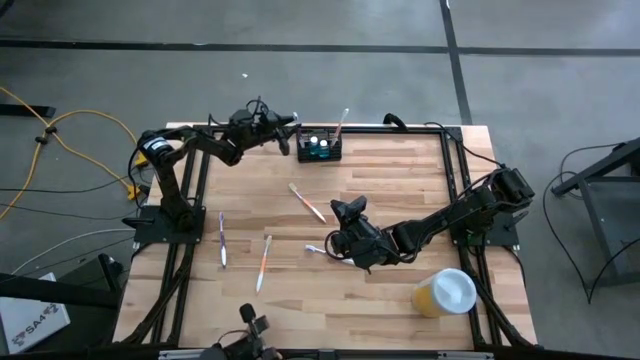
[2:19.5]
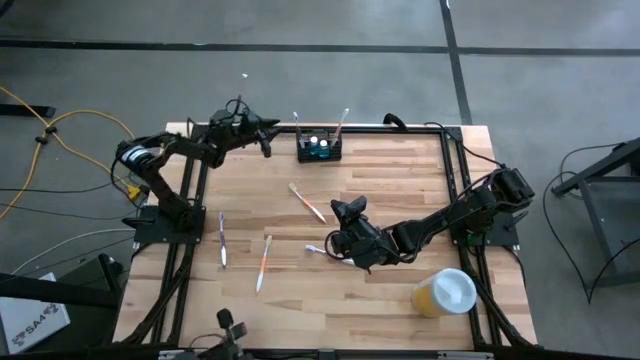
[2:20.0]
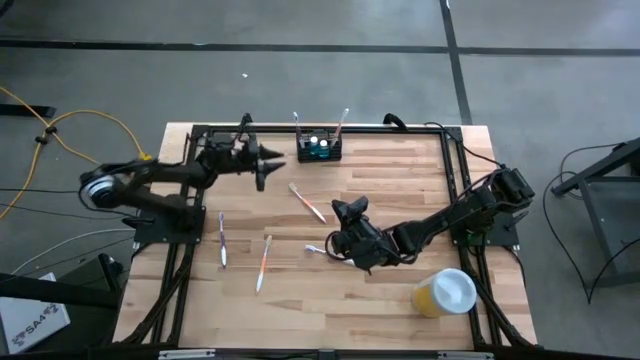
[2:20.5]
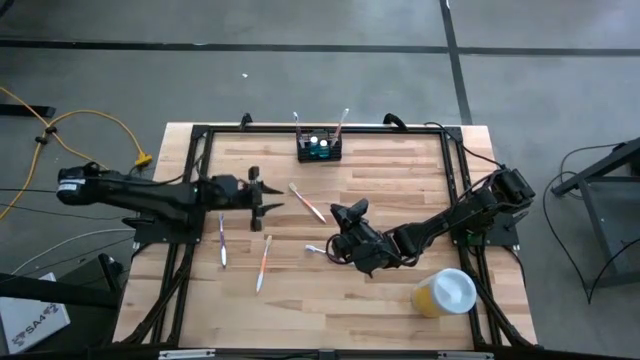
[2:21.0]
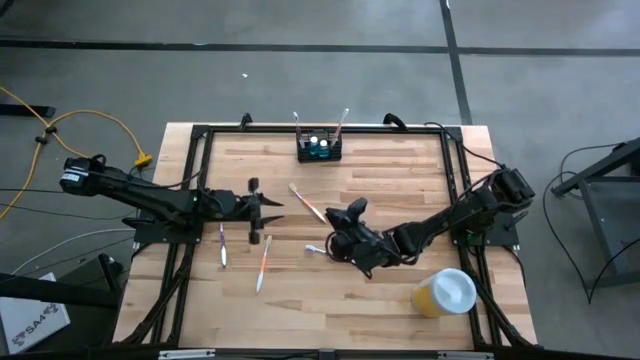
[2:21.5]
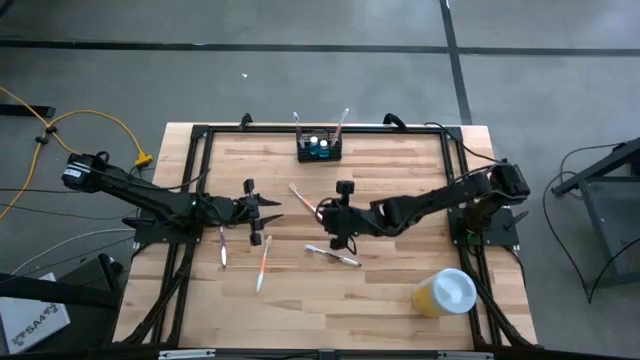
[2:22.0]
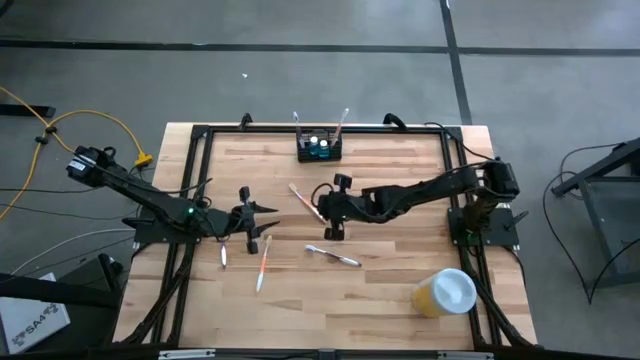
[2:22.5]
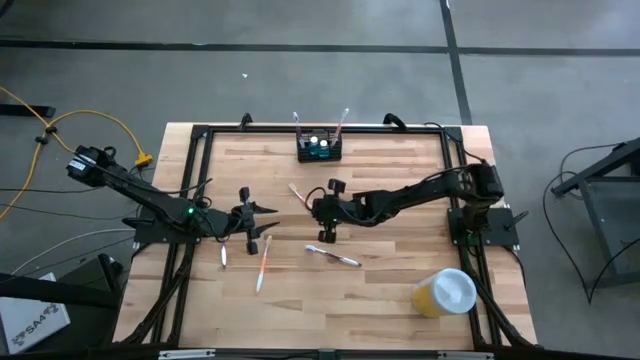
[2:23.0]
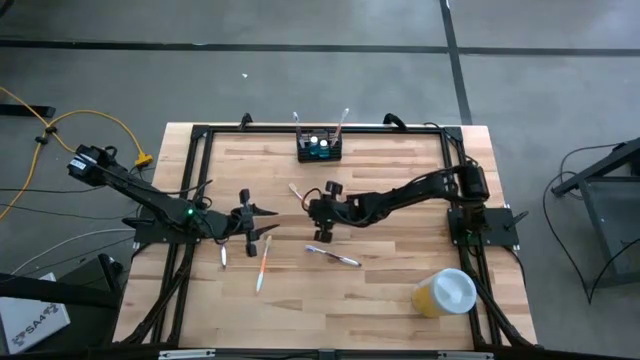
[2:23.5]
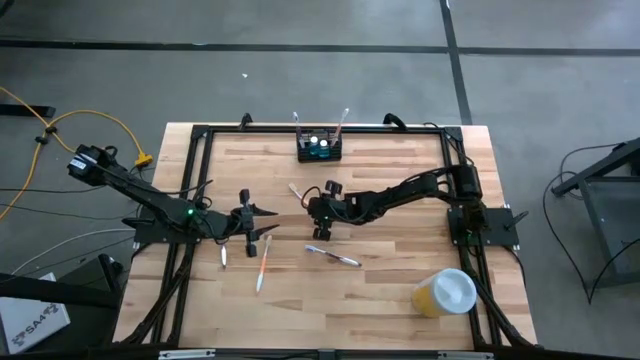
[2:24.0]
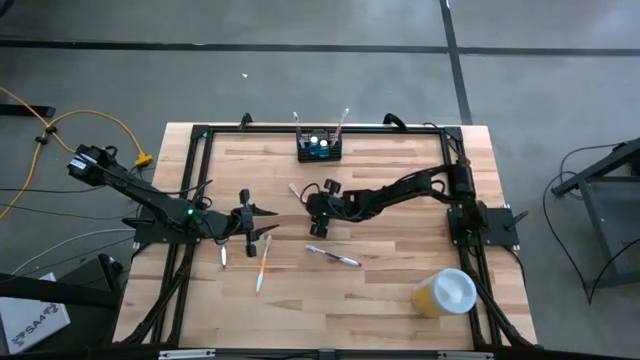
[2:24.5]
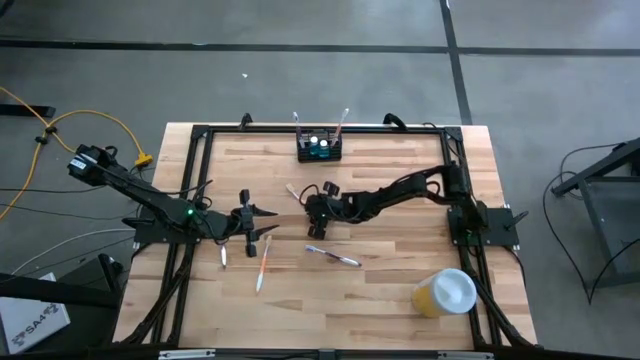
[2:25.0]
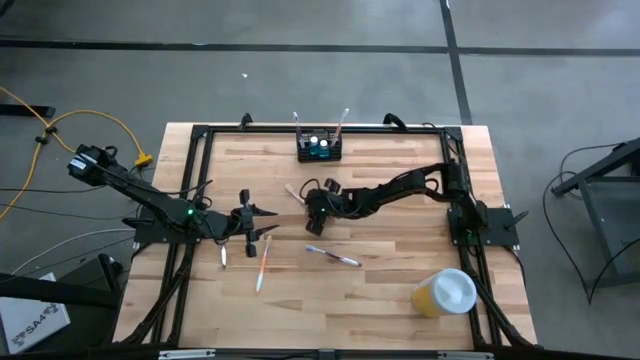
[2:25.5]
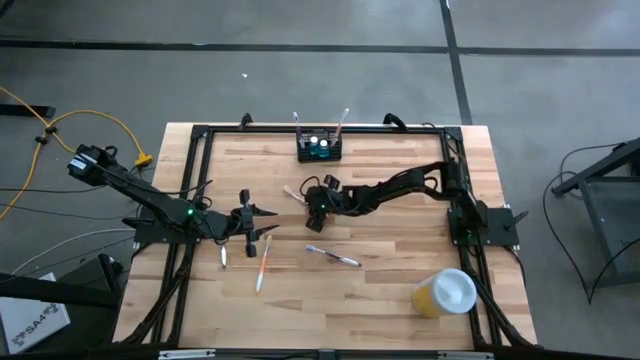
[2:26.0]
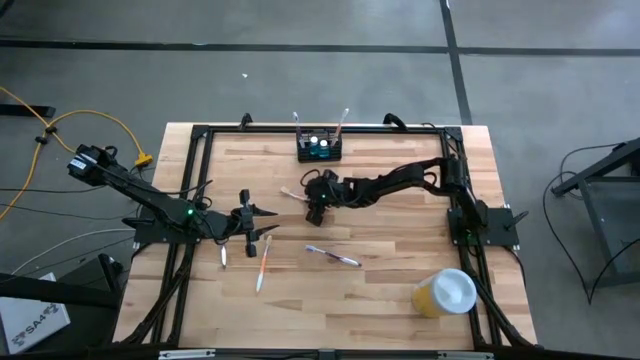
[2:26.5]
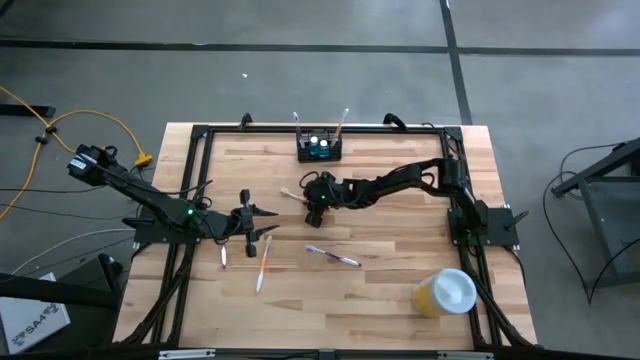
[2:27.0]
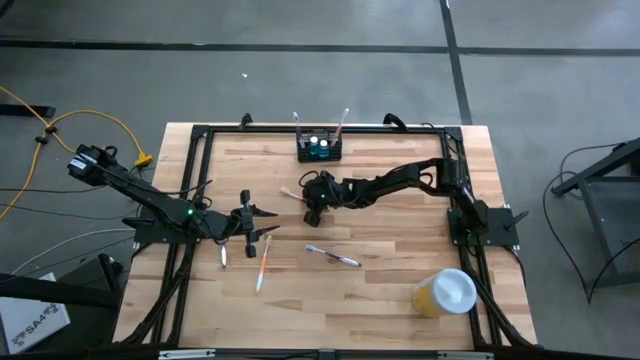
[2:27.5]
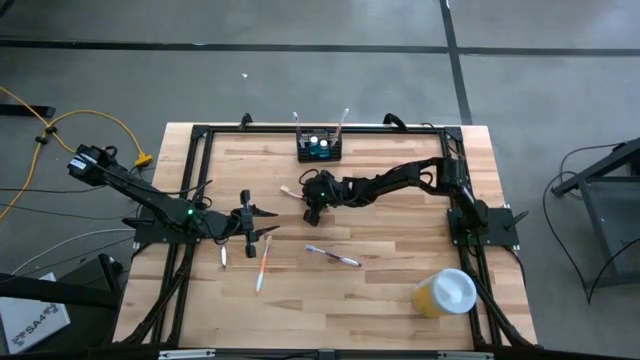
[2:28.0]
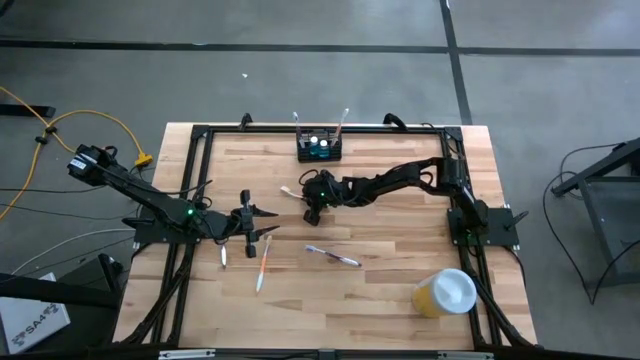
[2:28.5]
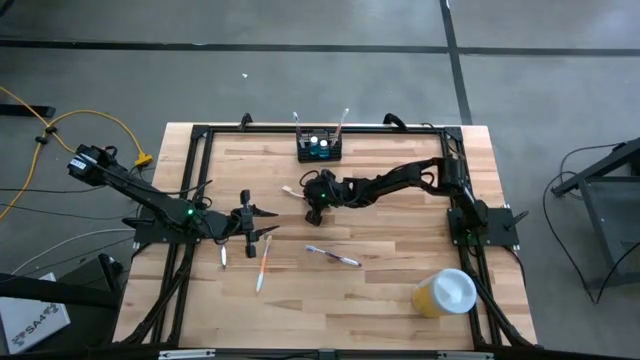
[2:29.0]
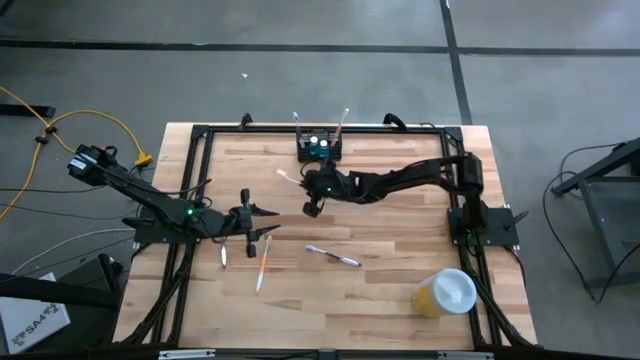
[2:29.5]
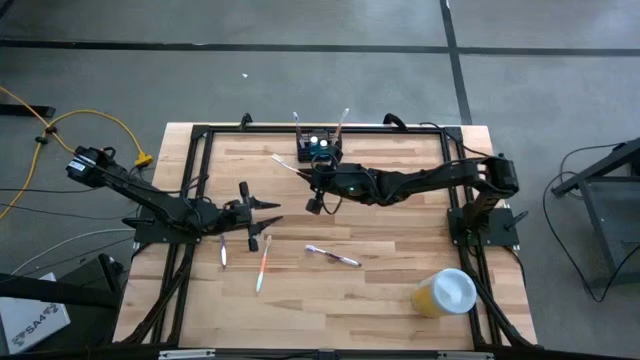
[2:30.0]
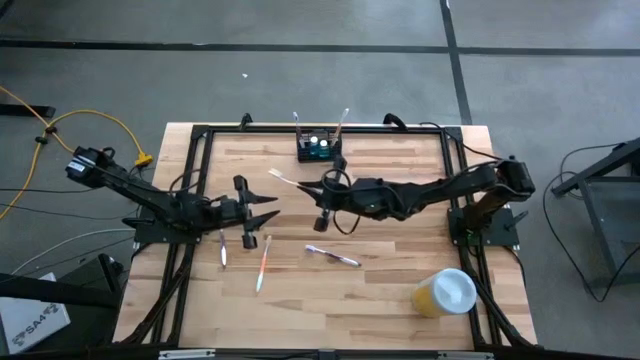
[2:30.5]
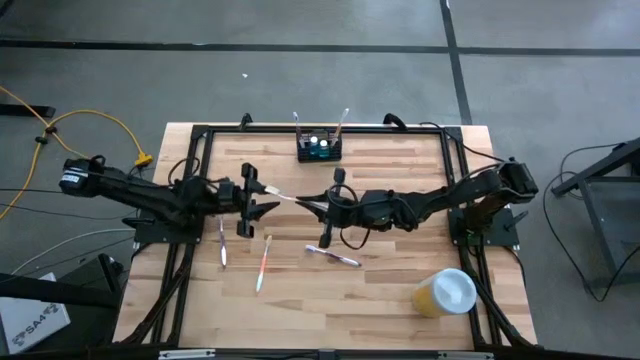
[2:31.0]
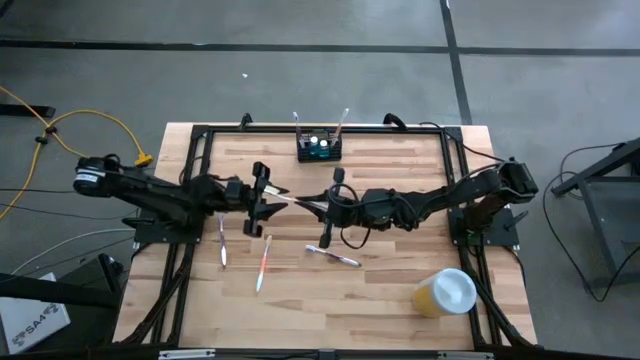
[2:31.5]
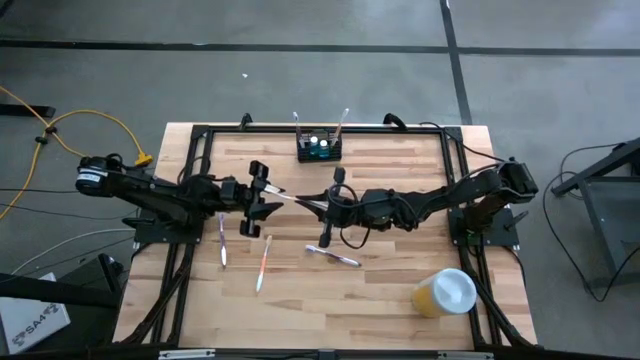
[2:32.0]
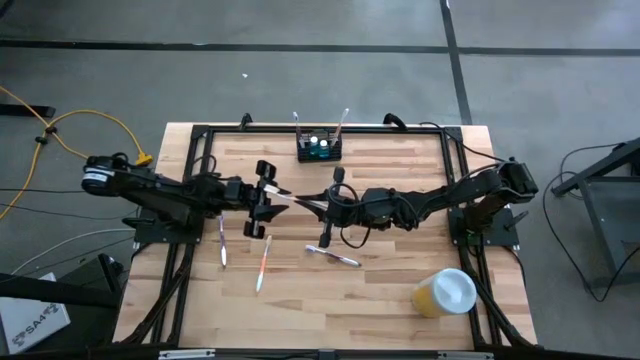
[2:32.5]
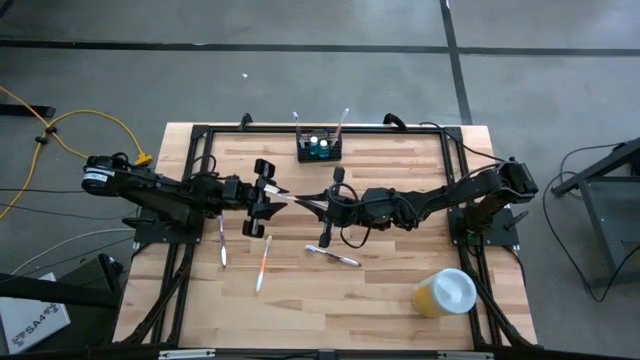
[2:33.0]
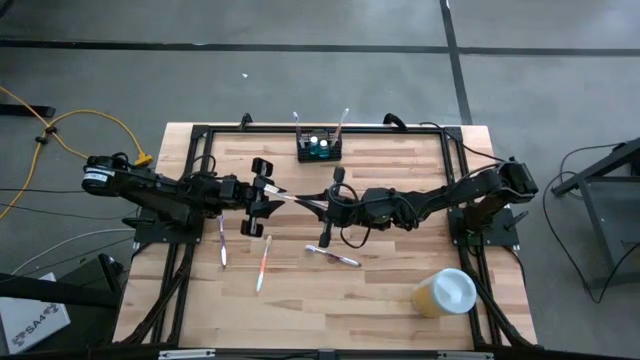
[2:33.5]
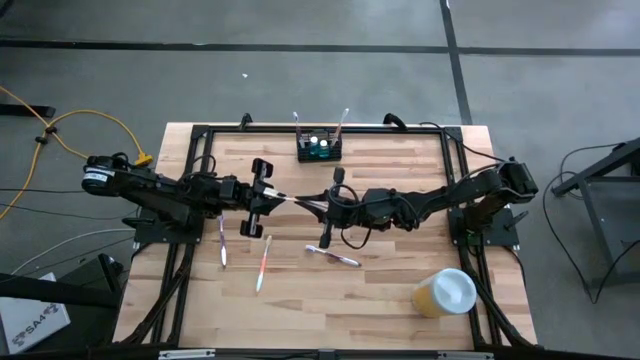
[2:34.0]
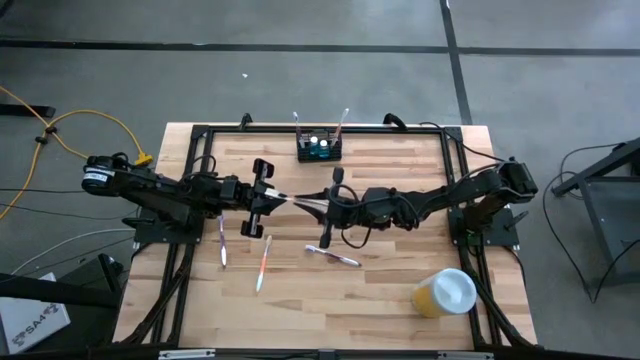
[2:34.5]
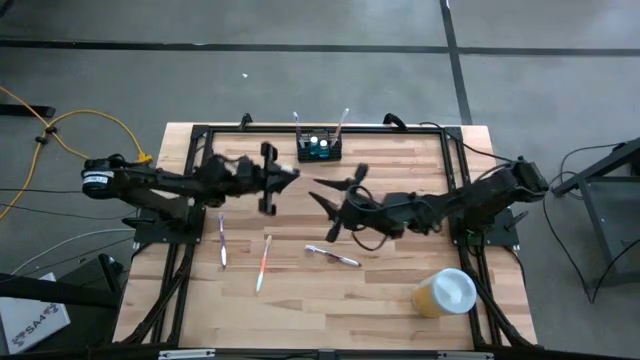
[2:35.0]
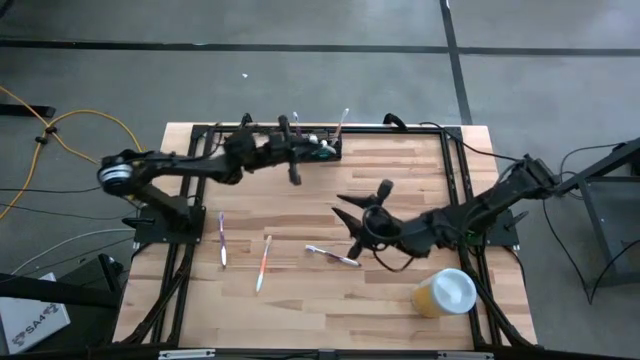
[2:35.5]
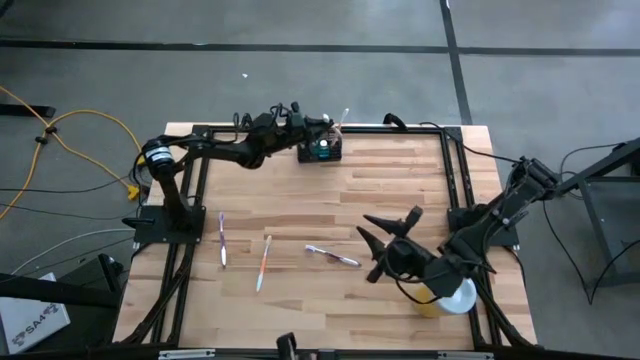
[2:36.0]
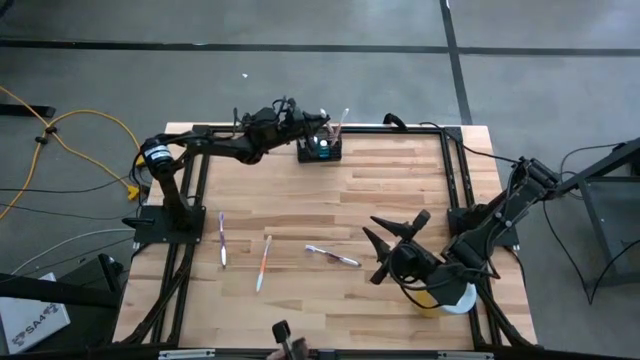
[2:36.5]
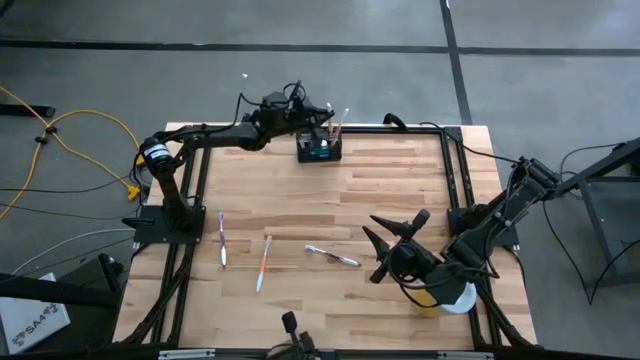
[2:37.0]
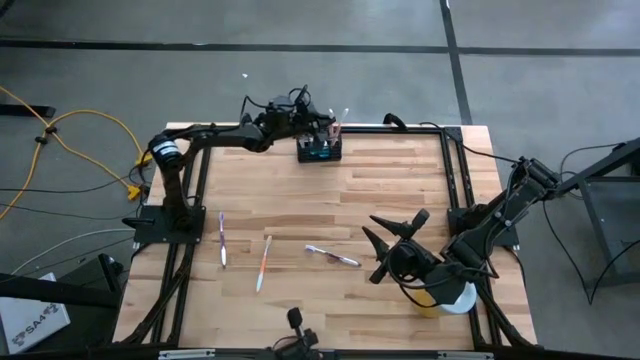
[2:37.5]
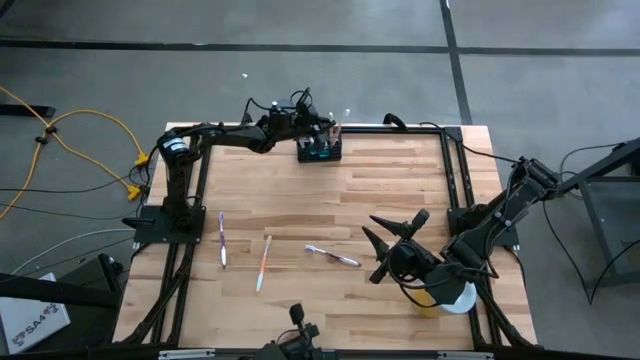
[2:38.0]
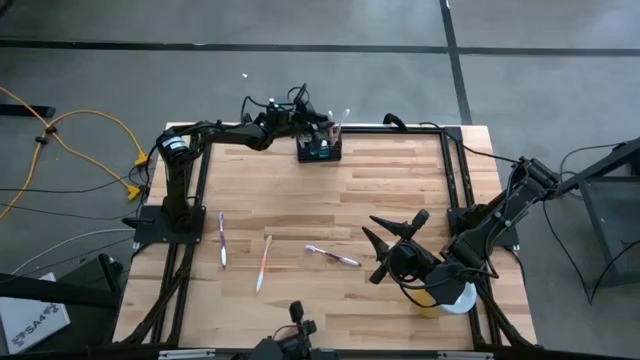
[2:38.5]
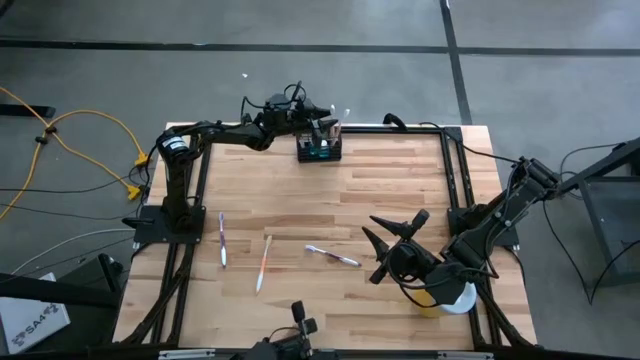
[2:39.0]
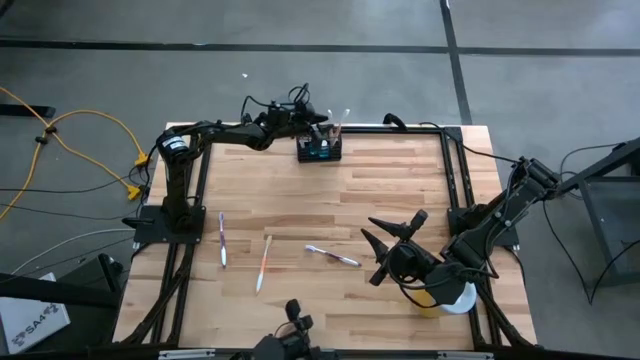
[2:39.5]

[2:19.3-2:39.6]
Task: Pick & Place toothbrushing station
Put the top orange toothbrush into the wire organizer

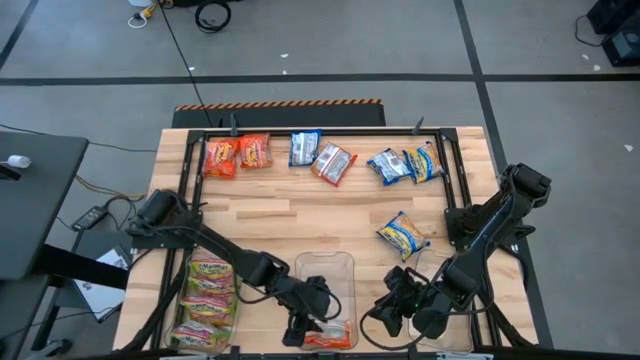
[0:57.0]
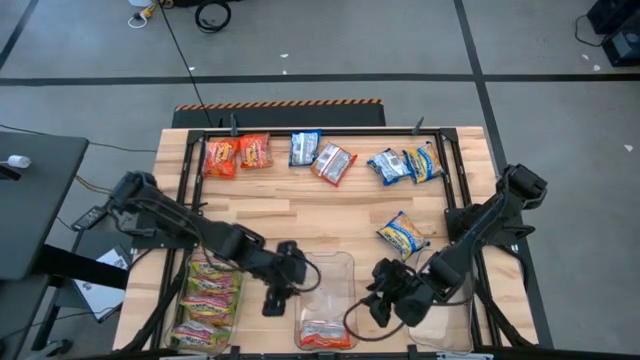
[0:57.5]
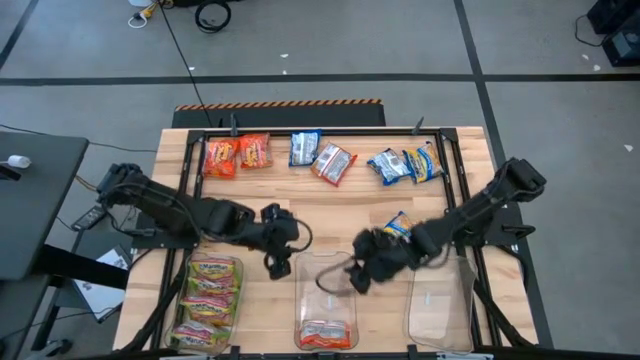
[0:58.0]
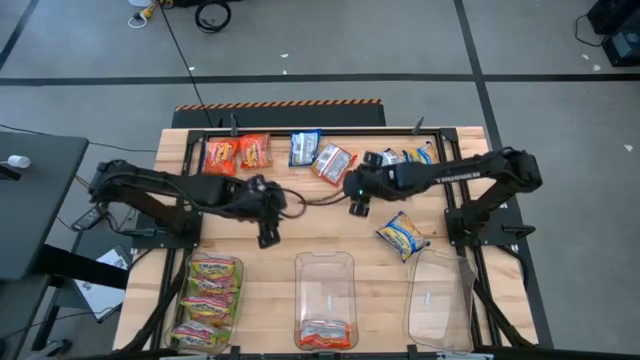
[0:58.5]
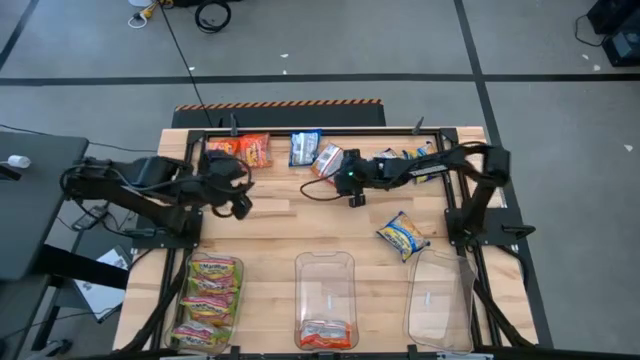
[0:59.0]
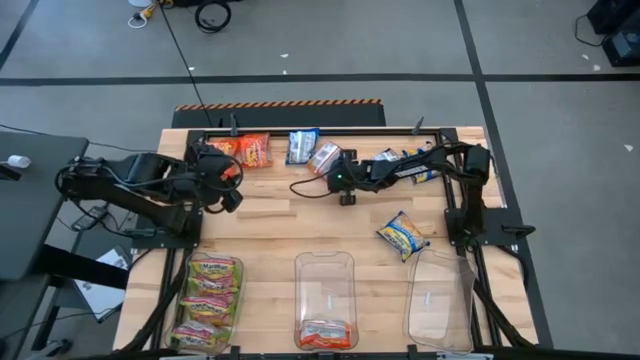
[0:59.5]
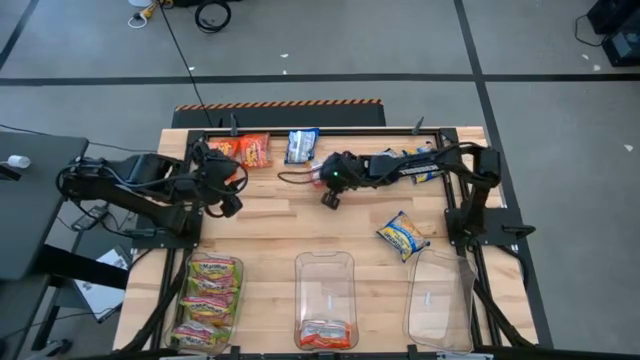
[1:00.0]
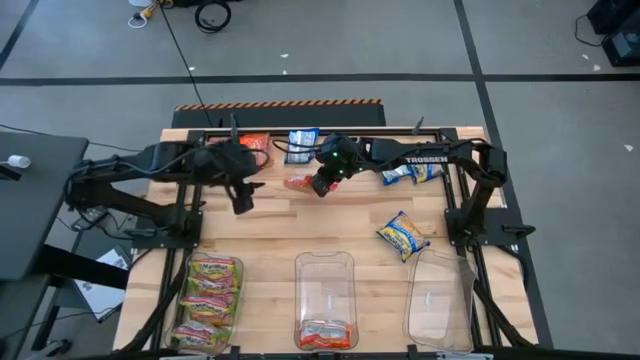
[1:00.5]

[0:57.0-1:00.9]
Task: Sort Maruchan noodles
Put the orange noodle pack into the middle transparent bin
